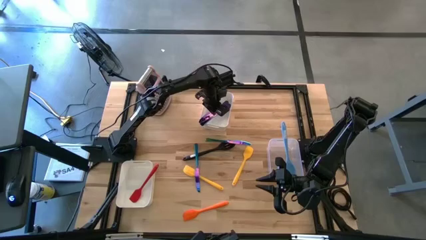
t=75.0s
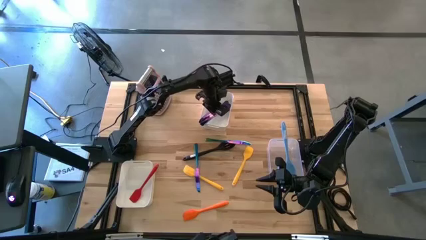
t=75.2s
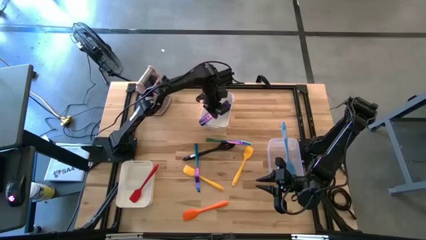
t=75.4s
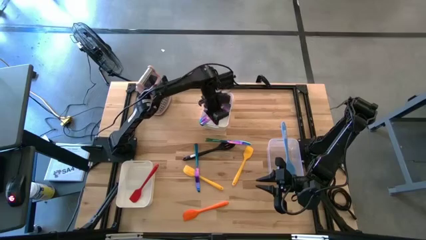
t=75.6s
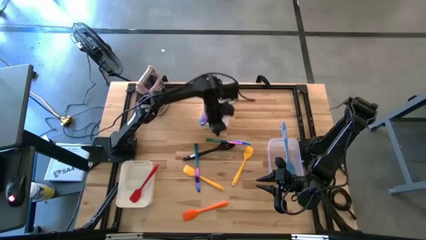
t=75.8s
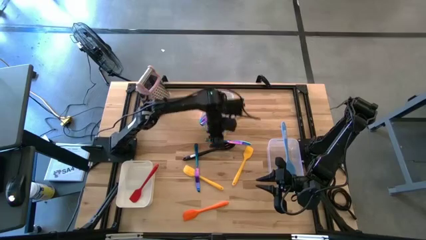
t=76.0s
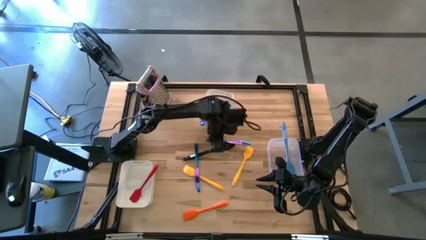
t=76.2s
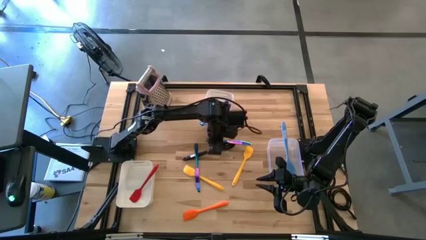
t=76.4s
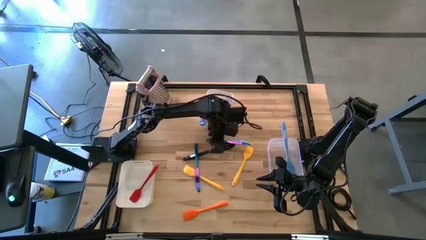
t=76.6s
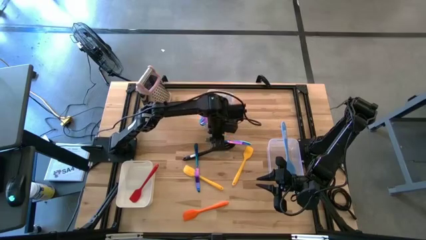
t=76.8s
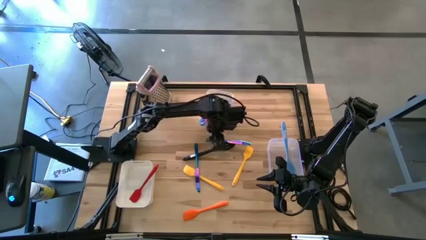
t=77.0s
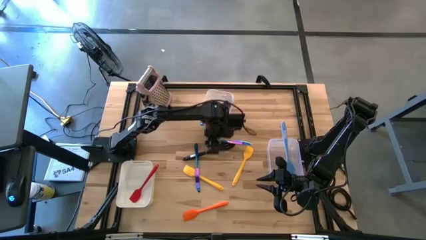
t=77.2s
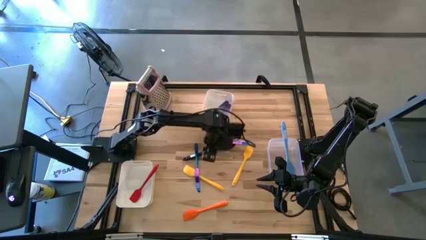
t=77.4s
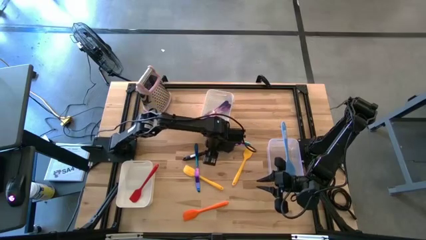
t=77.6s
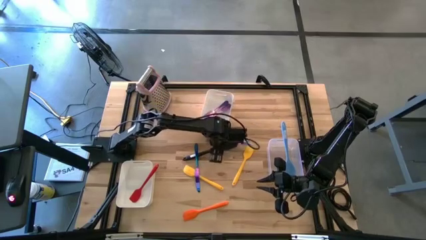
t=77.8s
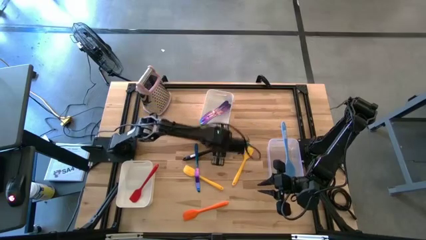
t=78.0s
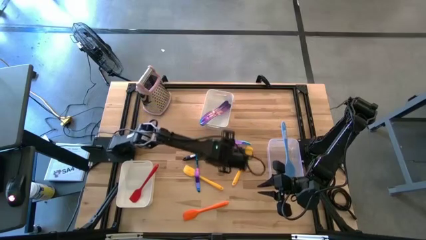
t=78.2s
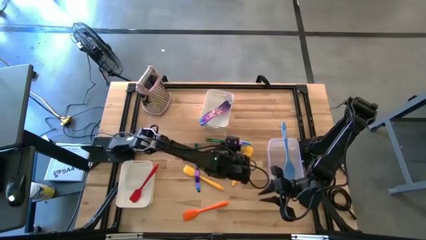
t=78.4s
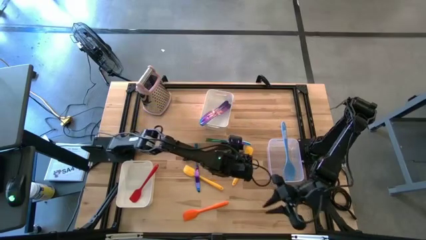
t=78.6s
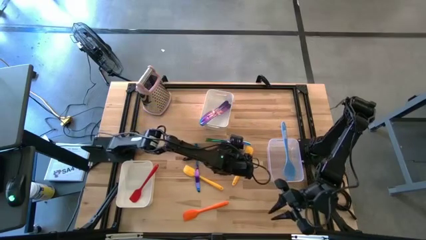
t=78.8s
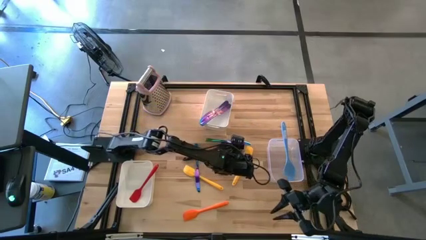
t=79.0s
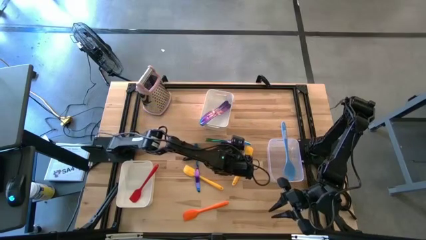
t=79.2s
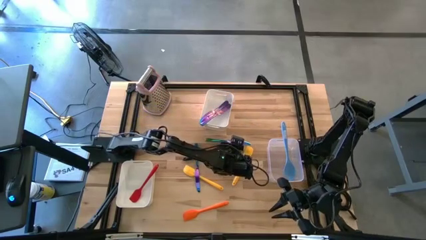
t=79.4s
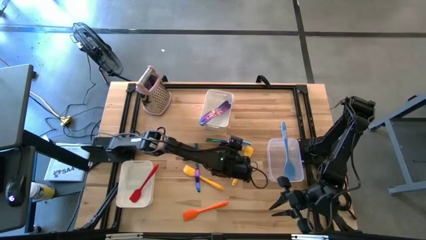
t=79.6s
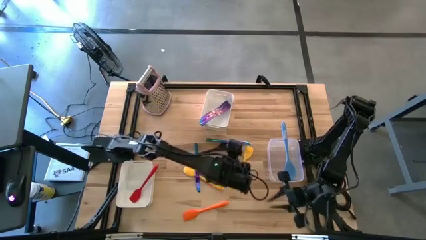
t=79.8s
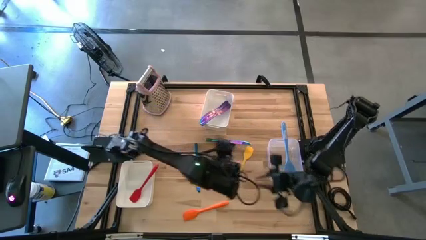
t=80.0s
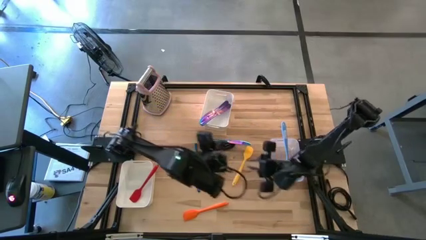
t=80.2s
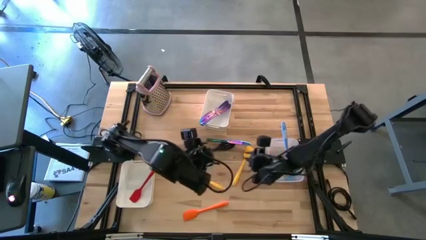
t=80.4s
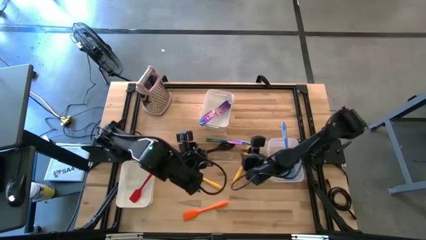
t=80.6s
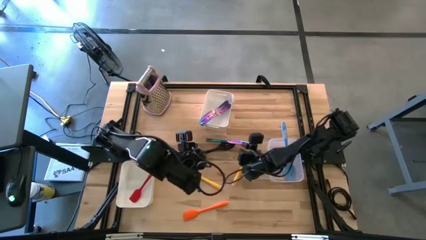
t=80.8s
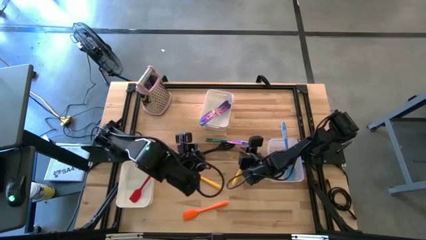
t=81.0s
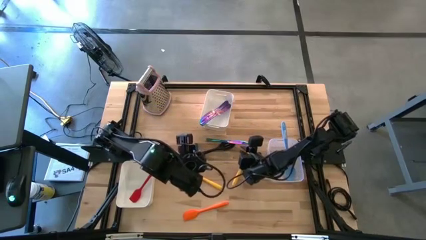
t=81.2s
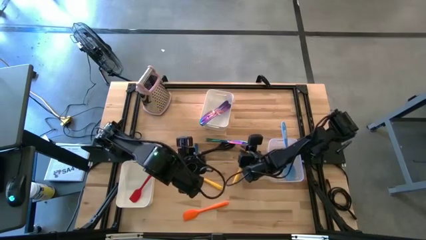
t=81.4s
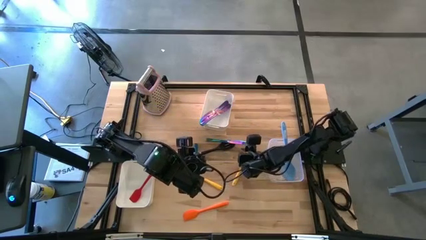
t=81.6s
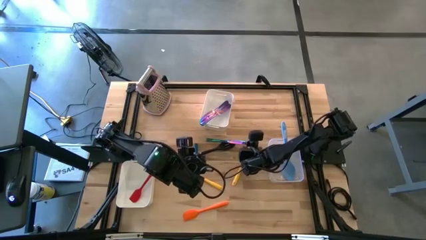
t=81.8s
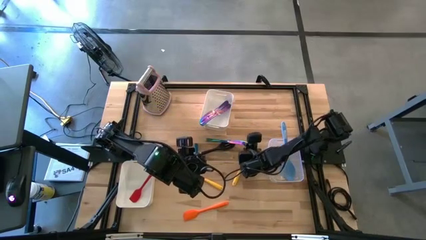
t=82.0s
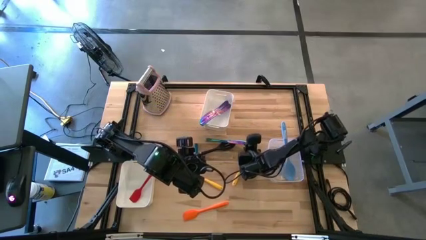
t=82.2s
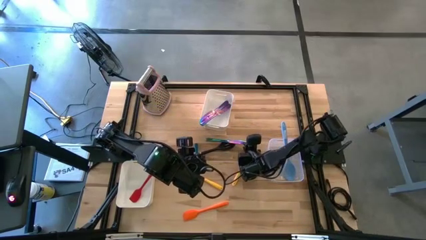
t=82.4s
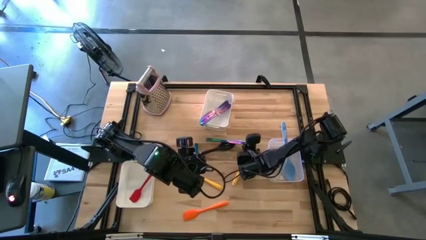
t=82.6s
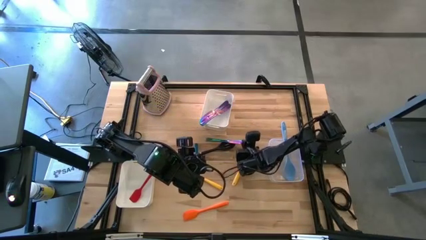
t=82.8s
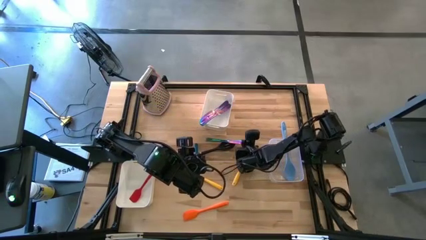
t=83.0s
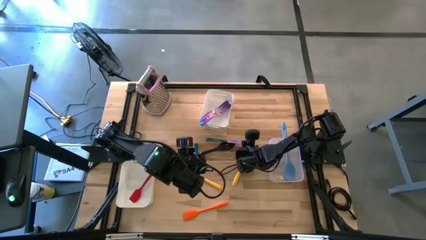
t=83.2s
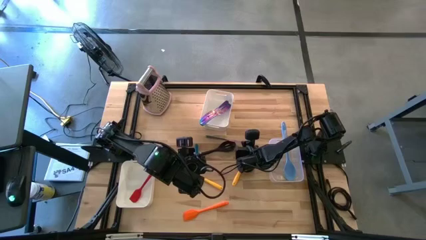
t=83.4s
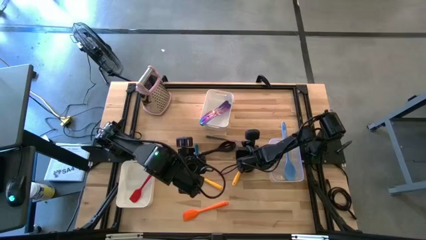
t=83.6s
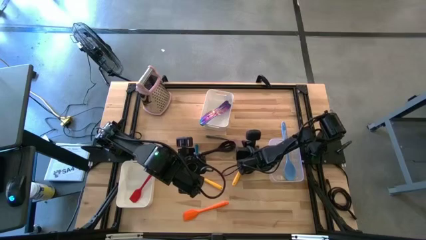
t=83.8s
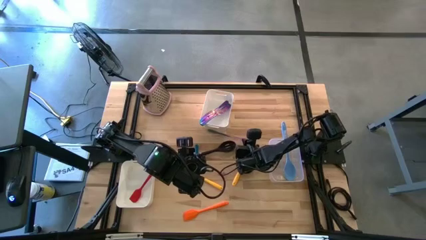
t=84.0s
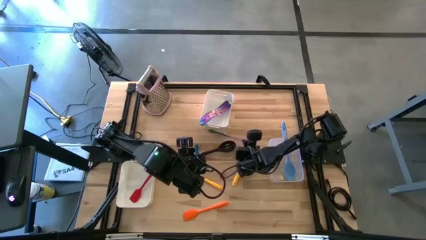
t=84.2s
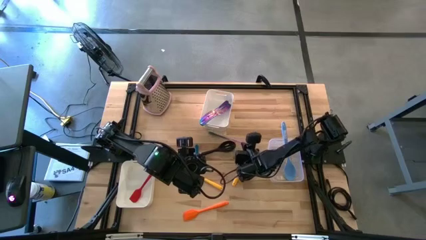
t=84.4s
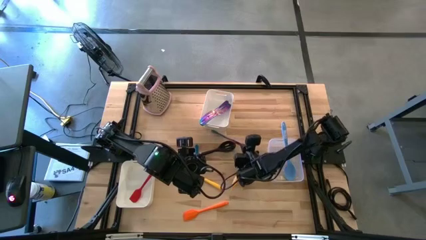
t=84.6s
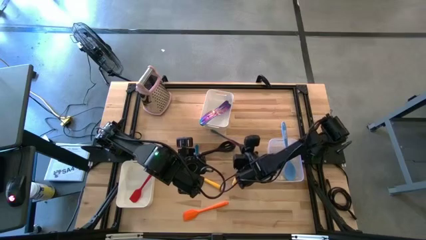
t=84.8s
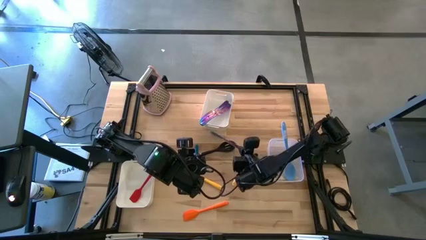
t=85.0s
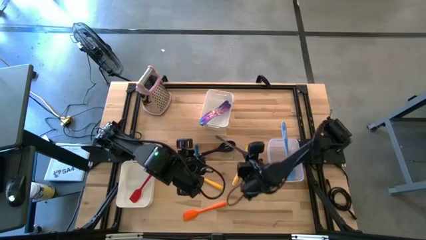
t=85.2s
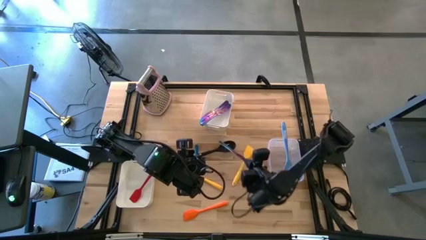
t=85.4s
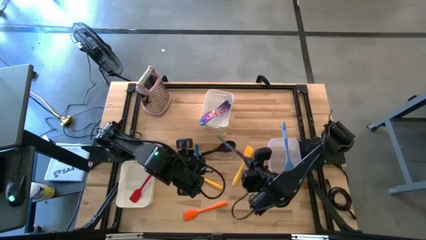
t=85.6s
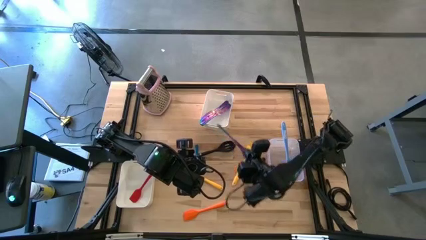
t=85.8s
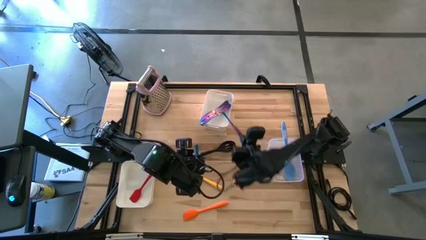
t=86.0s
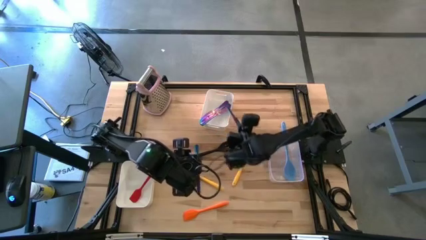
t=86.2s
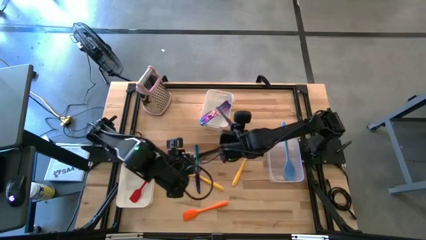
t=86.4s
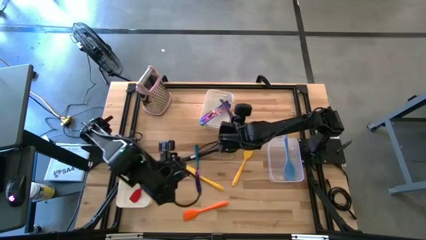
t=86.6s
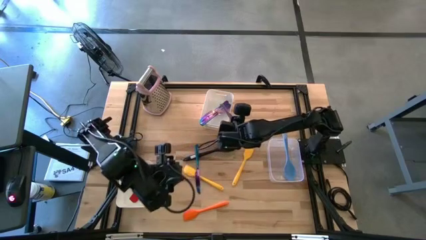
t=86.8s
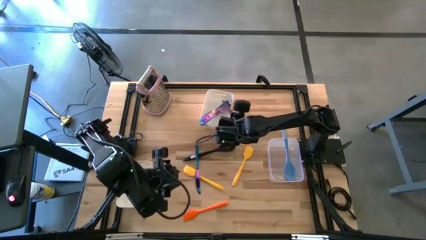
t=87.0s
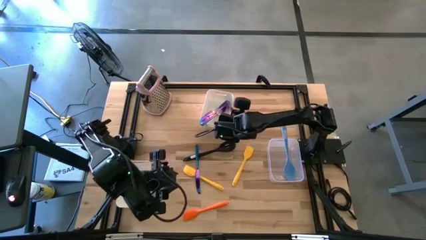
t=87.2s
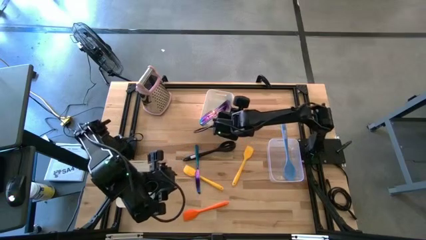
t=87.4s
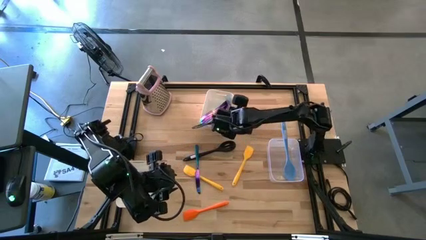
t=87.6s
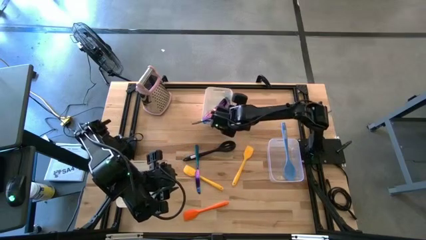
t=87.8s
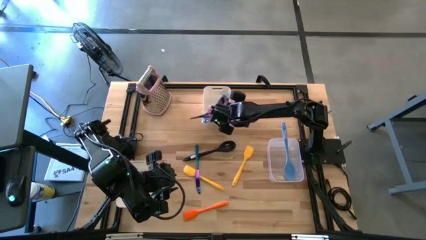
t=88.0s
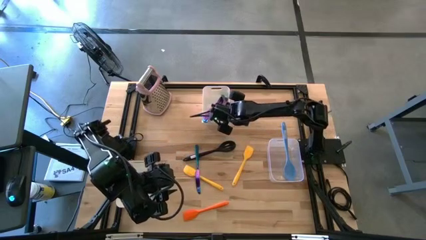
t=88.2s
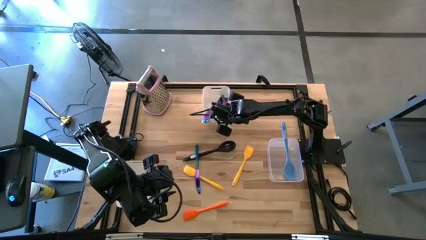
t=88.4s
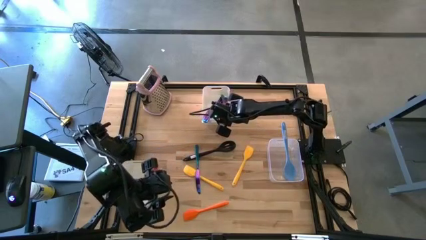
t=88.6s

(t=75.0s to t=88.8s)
Task: Pick & Place Kitchen Items
Put the blue table knife into the top white bin

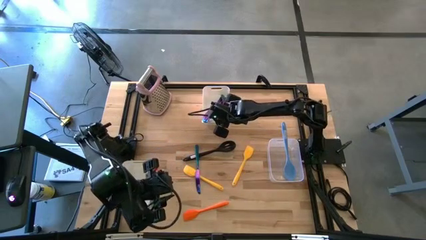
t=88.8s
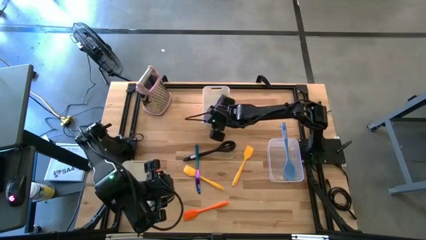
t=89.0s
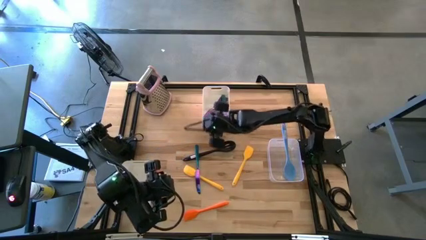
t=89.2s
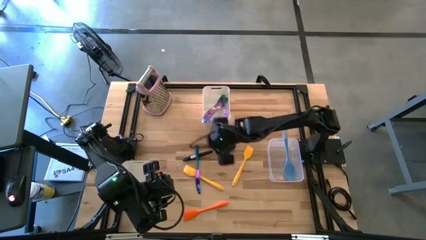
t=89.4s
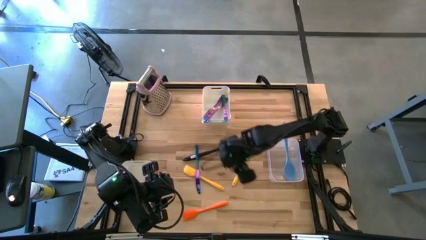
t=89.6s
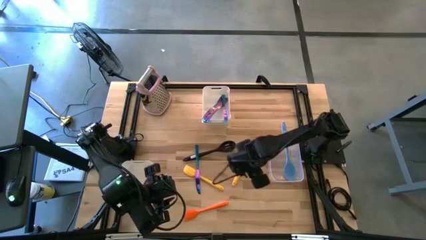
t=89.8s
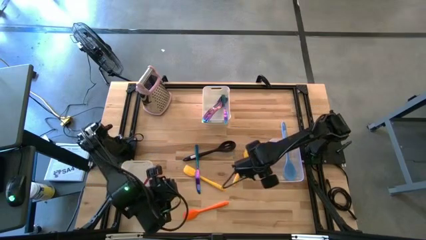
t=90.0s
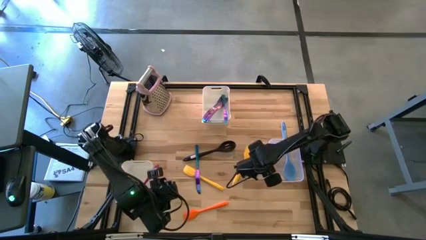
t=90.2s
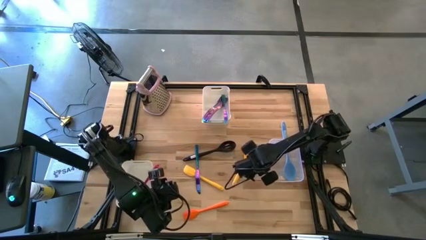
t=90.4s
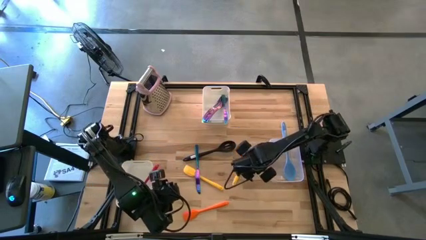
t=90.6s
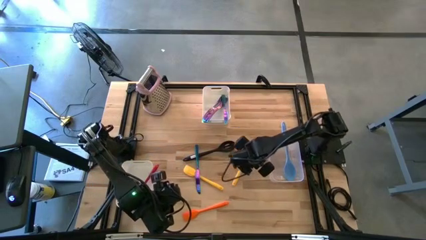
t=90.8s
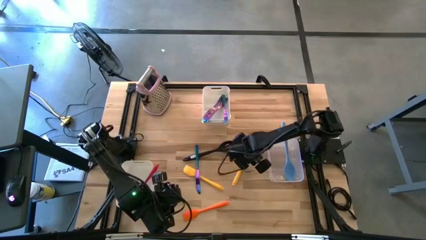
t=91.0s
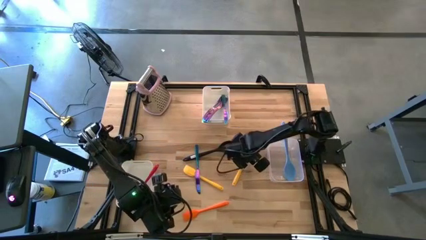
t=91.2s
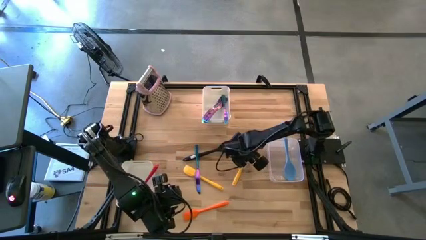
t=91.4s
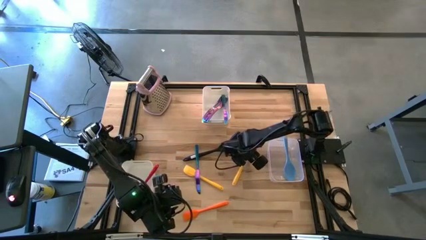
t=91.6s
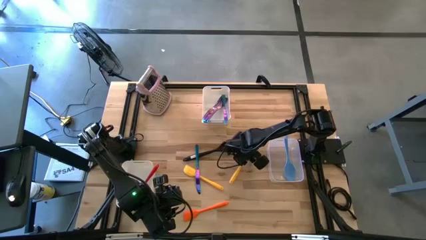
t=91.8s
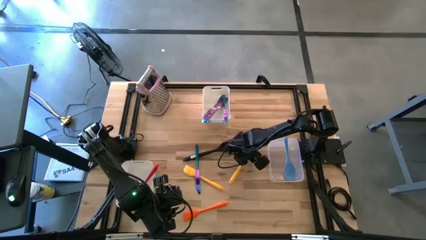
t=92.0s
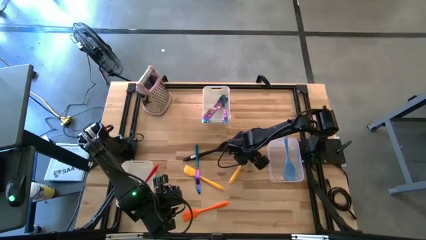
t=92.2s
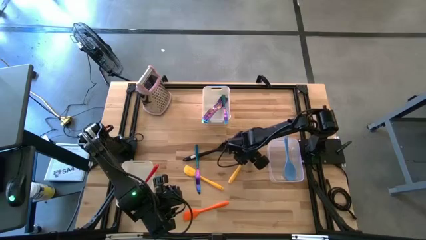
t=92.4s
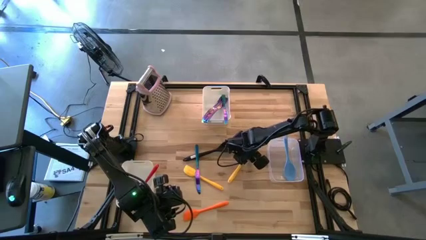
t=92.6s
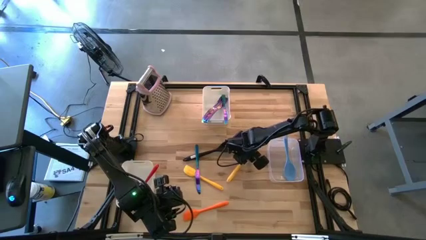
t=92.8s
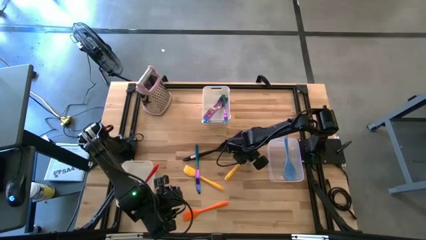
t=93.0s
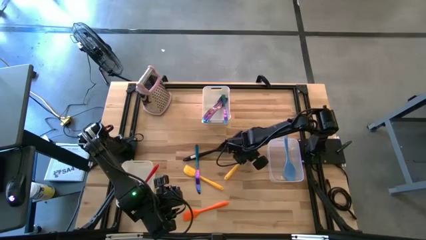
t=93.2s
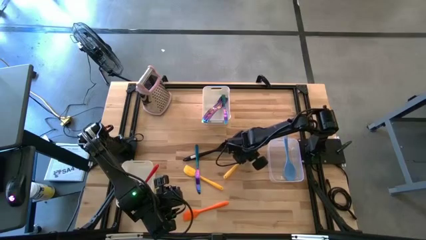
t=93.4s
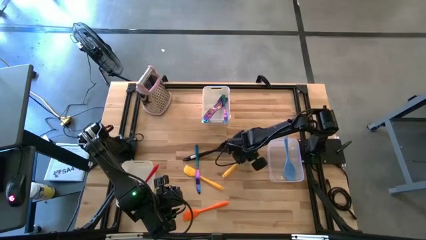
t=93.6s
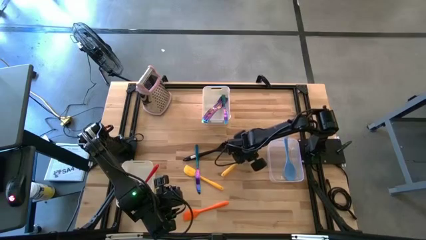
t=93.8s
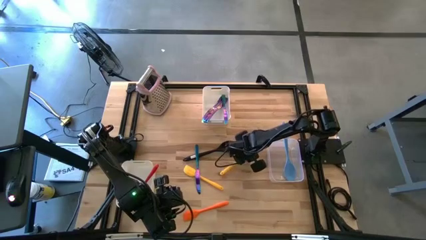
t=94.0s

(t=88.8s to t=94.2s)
Put the yellow spatula into the left white bin
